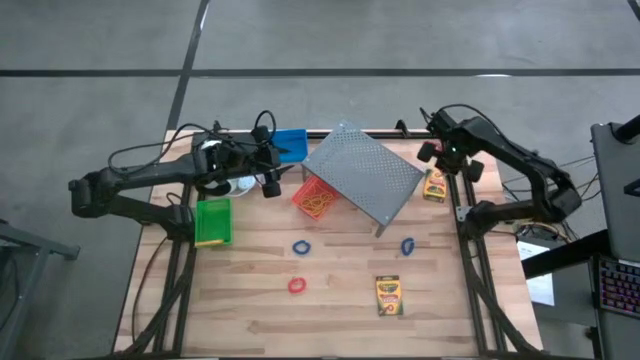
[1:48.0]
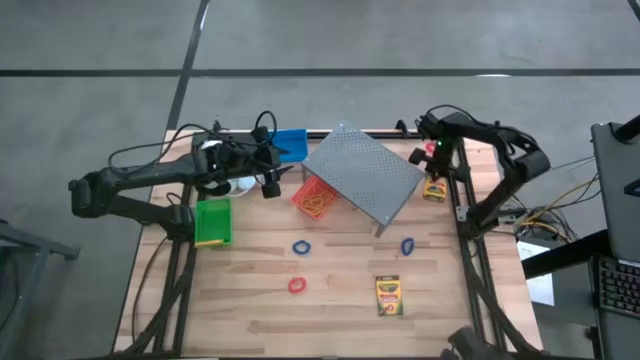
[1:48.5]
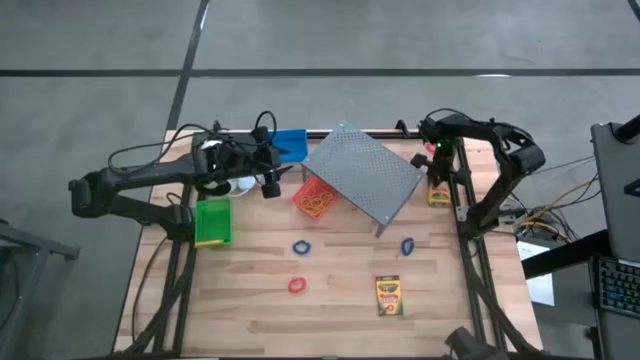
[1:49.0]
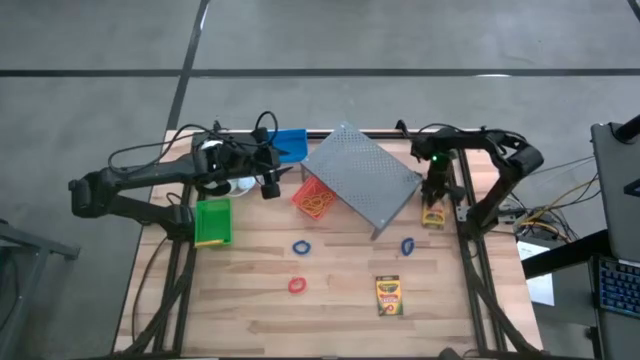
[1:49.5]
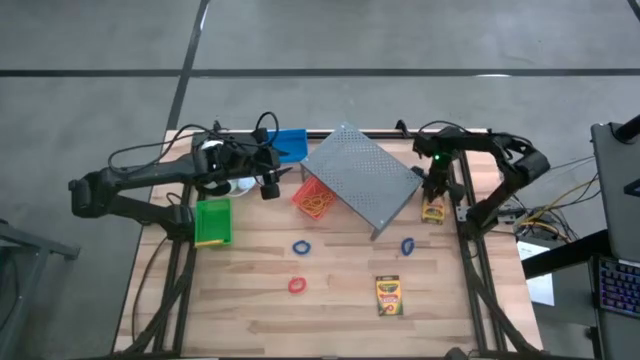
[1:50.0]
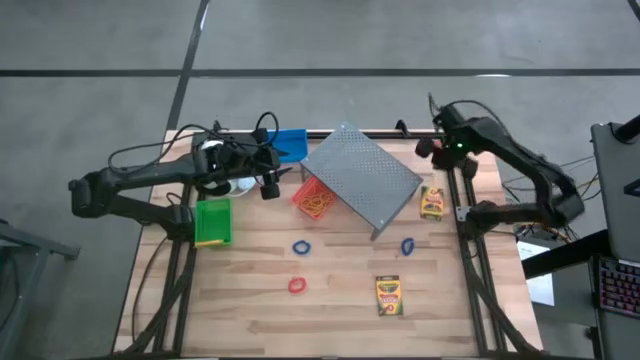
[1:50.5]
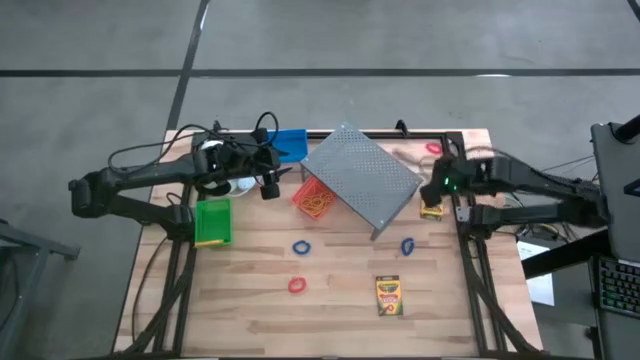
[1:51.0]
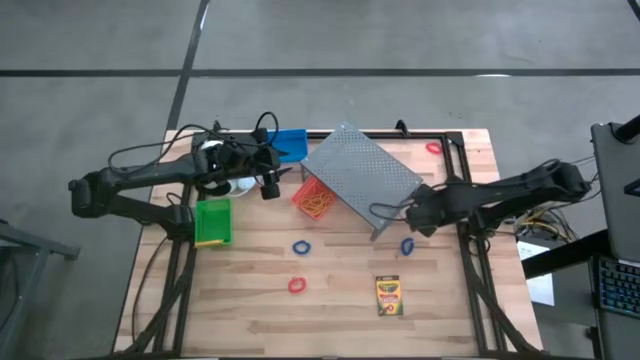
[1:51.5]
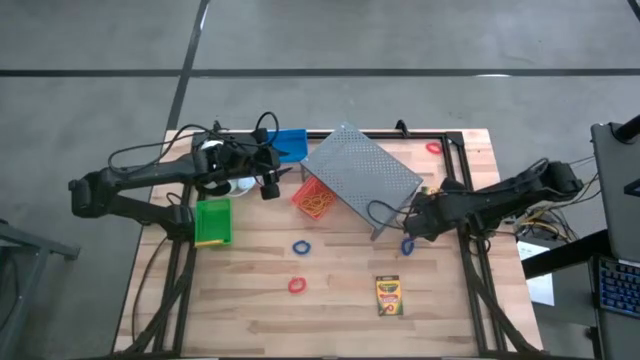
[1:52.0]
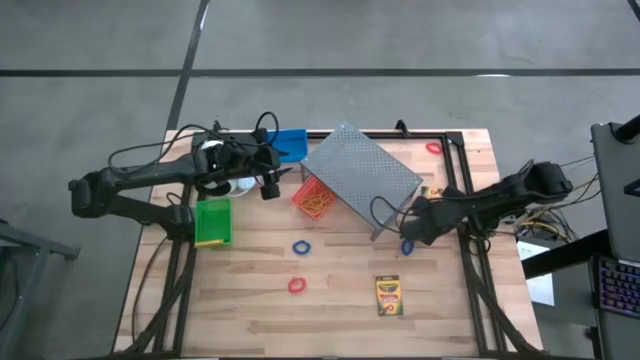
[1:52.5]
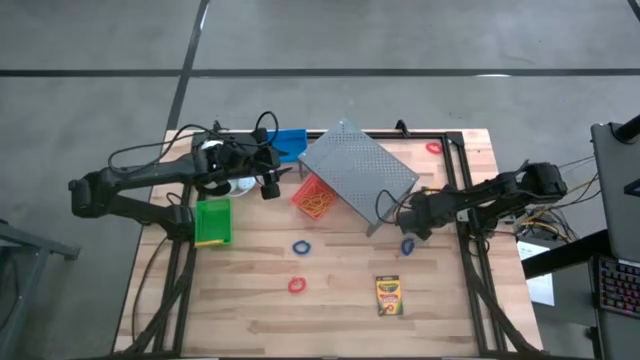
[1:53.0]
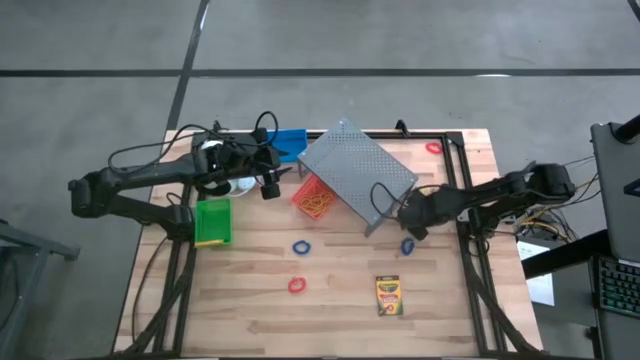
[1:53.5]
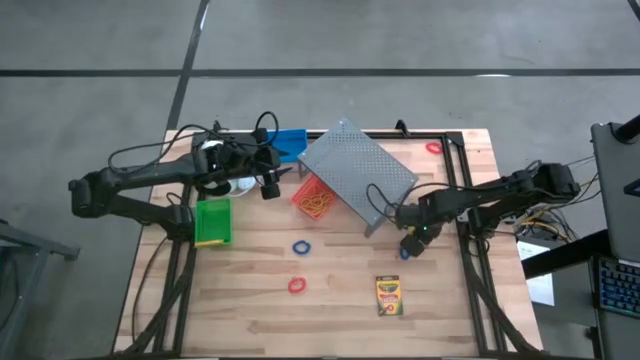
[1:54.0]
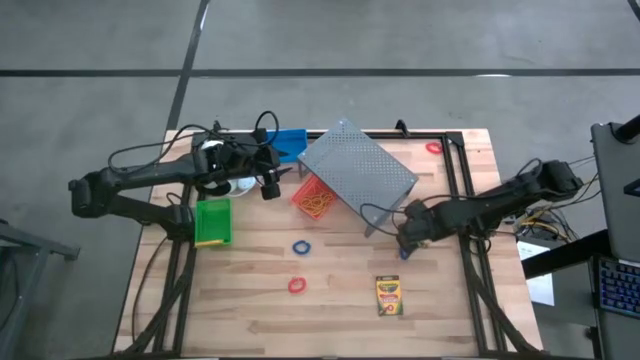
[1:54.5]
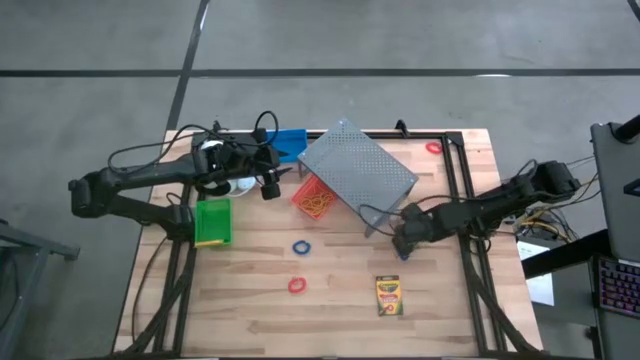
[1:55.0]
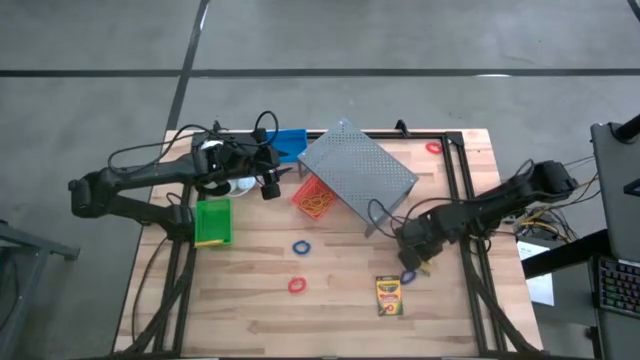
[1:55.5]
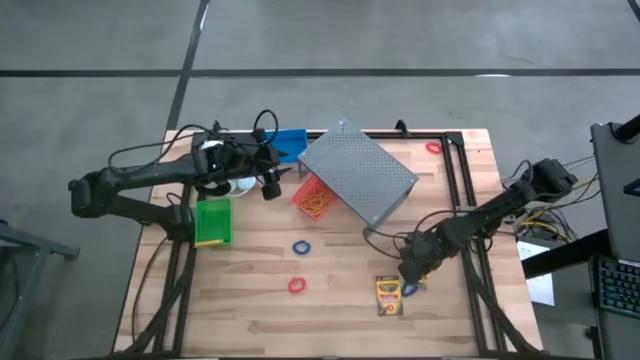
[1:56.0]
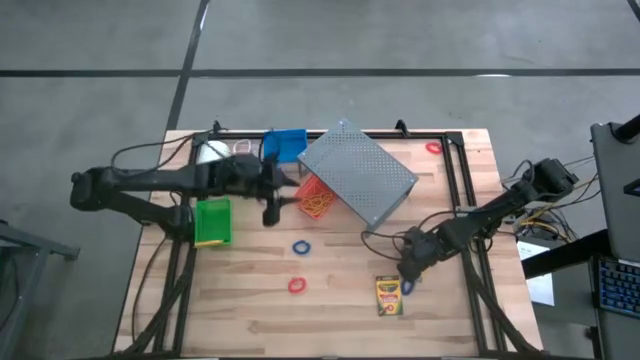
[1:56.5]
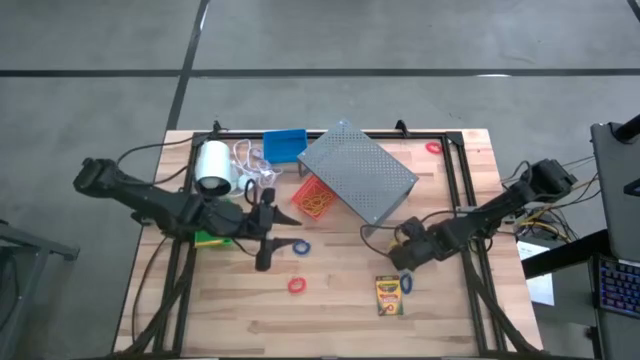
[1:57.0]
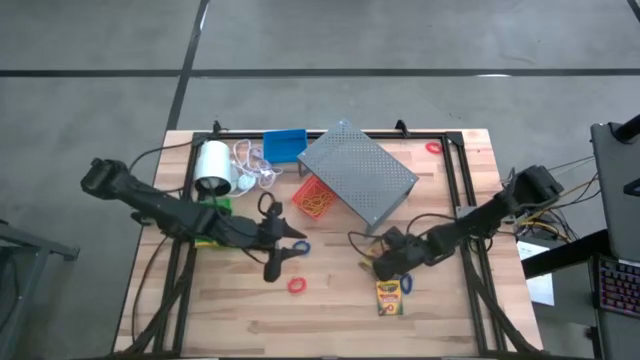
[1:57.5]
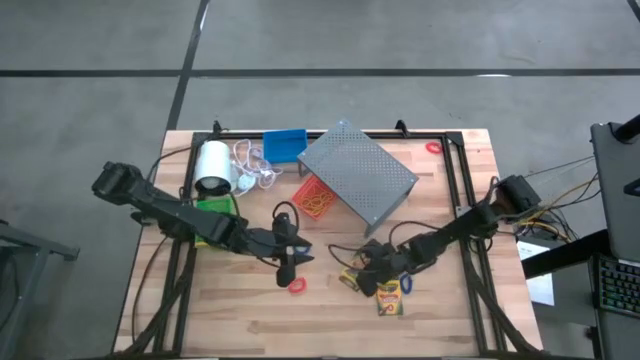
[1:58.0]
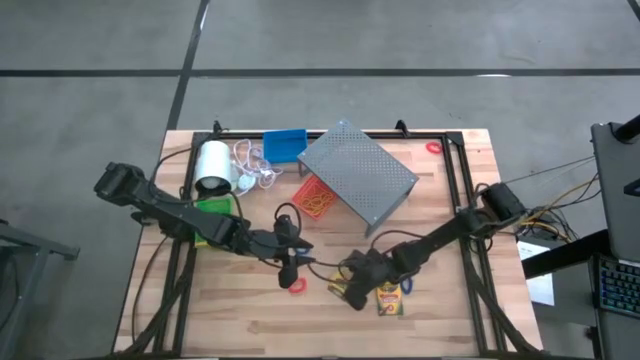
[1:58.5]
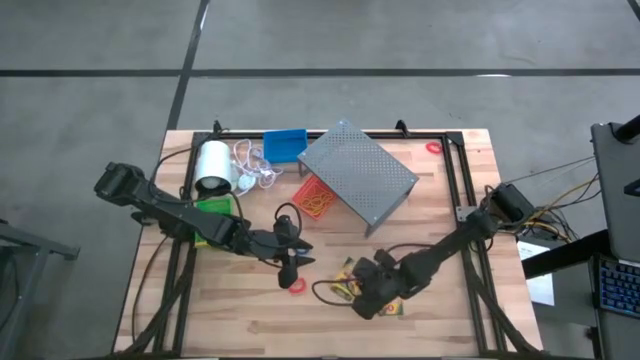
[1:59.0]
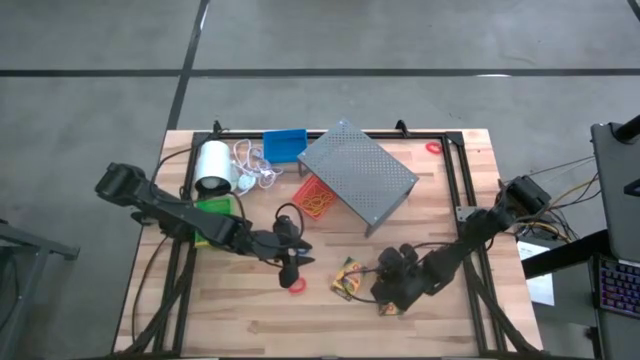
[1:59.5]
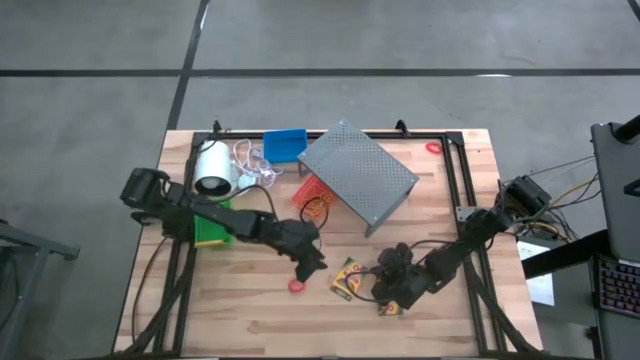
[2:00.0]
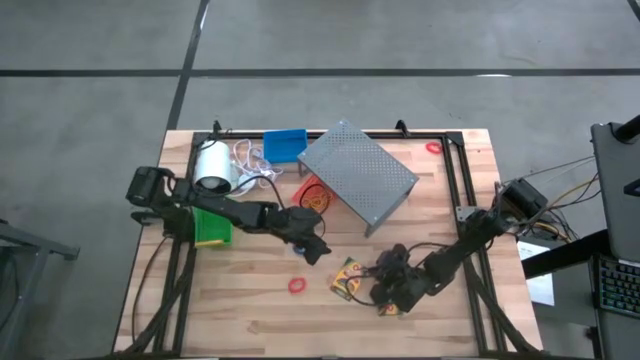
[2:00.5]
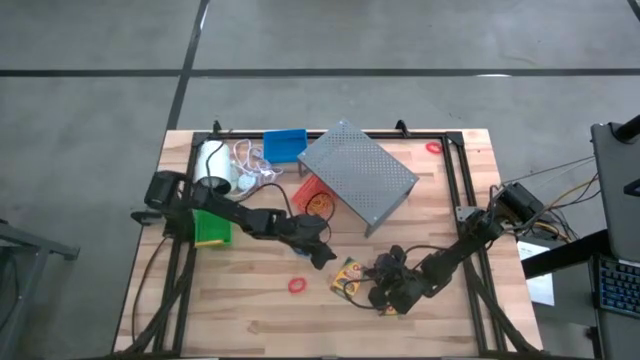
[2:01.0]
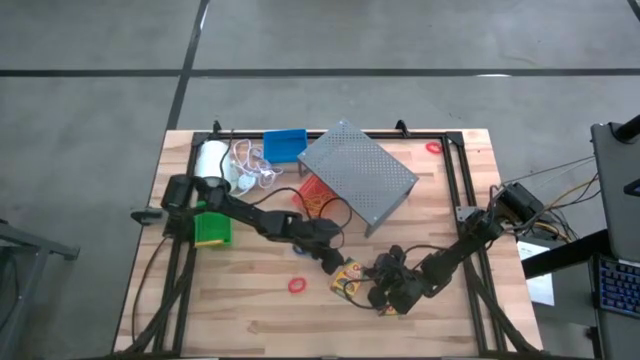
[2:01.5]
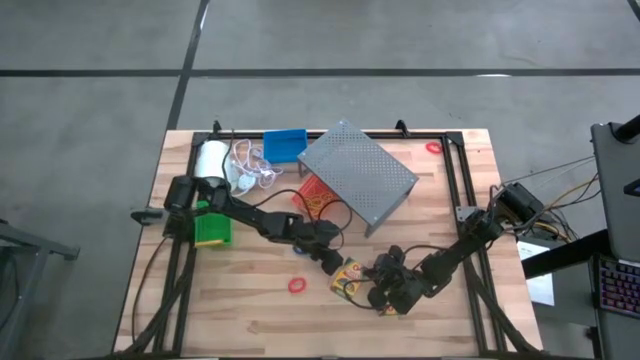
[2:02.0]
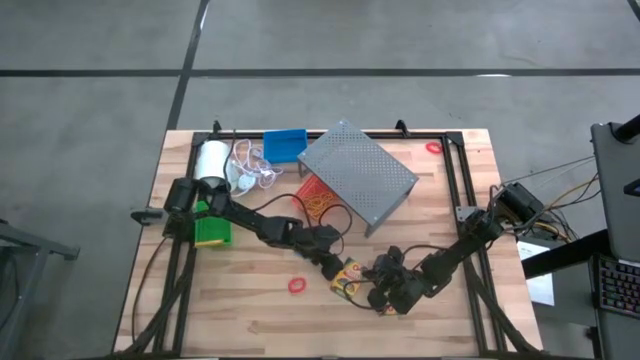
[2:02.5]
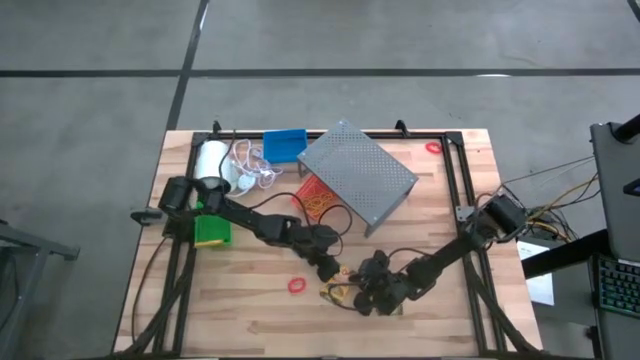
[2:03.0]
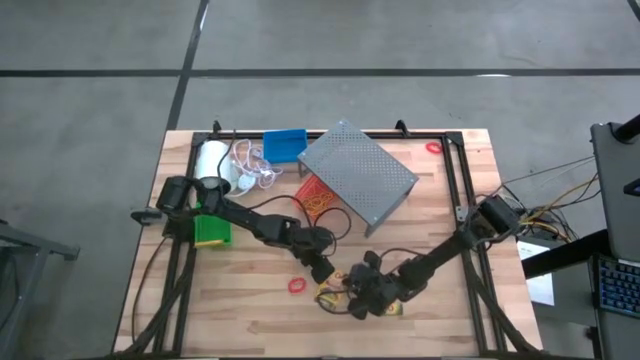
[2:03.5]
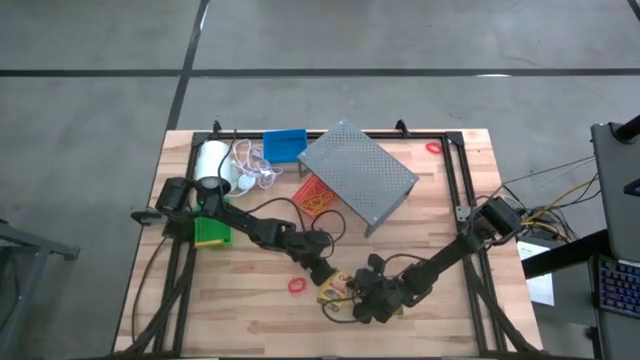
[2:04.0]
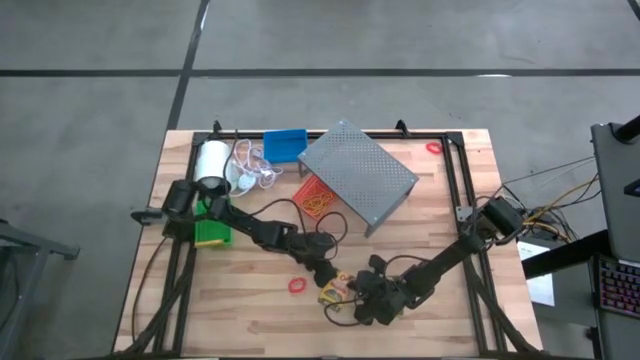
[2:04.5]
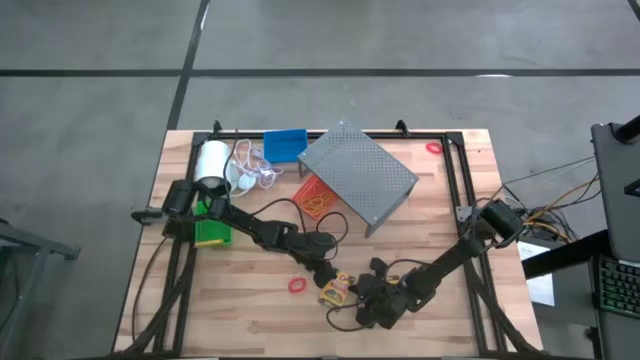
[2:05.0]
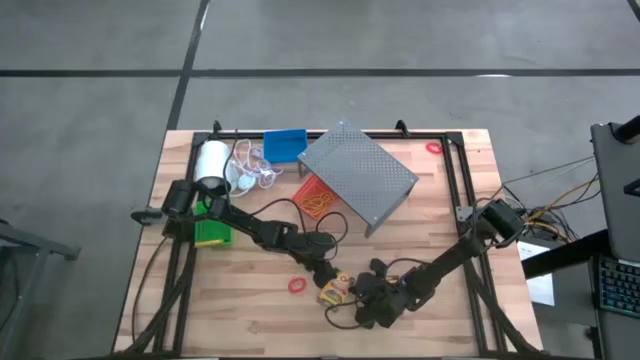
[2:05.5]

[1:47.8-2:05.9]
Task: Pick & Place Office Desk Supplies
Put the crayon box into the green bin

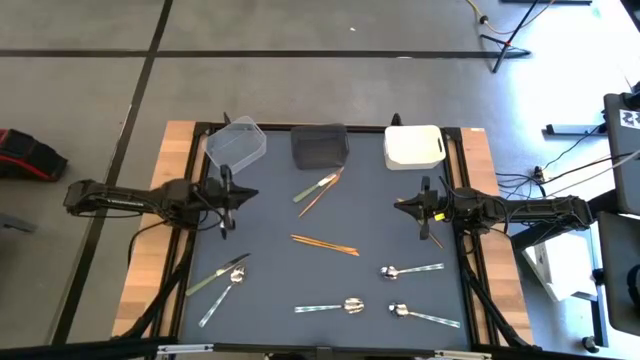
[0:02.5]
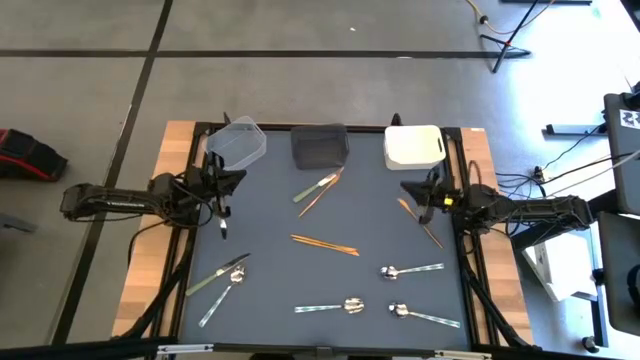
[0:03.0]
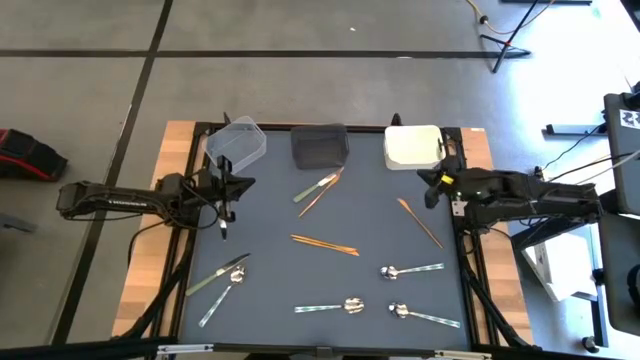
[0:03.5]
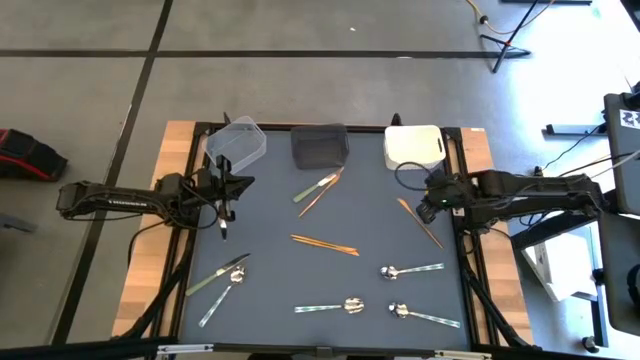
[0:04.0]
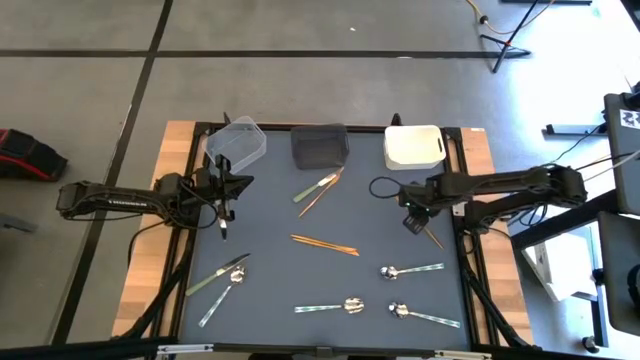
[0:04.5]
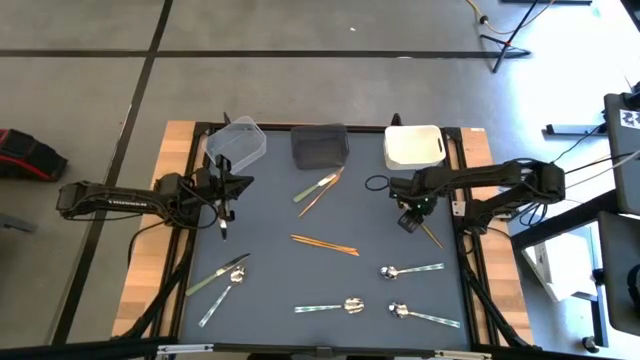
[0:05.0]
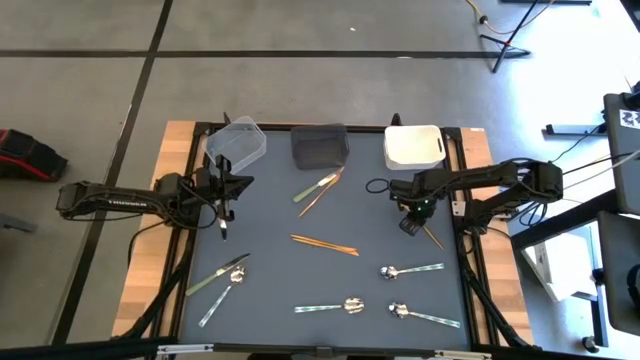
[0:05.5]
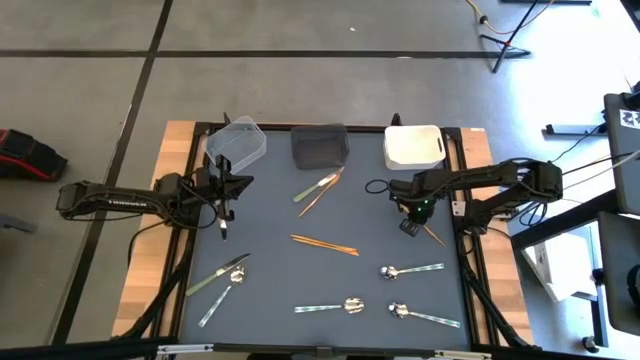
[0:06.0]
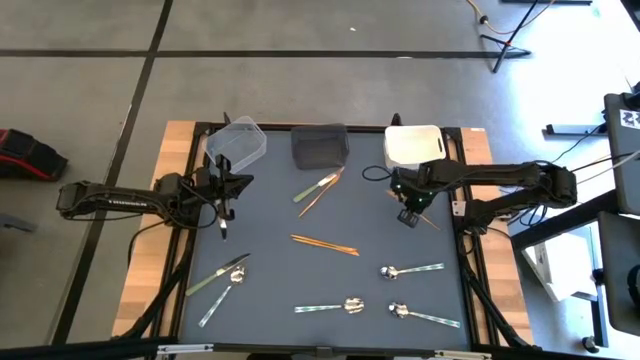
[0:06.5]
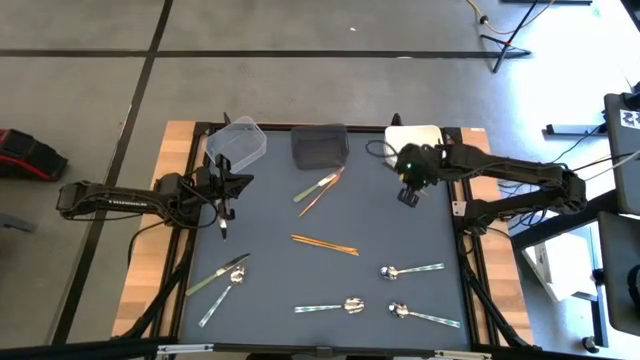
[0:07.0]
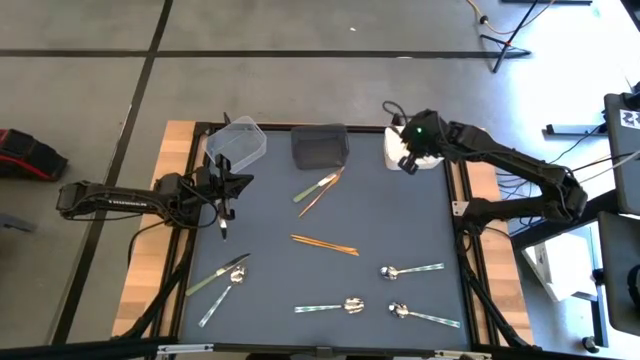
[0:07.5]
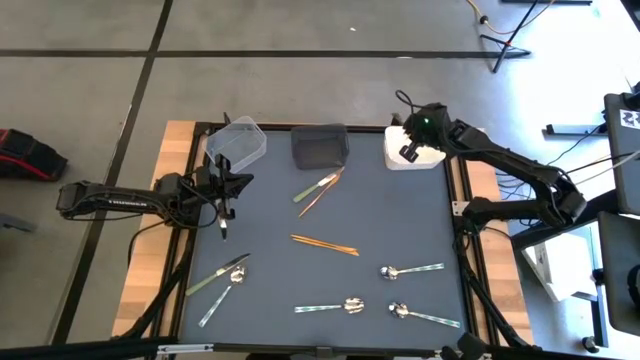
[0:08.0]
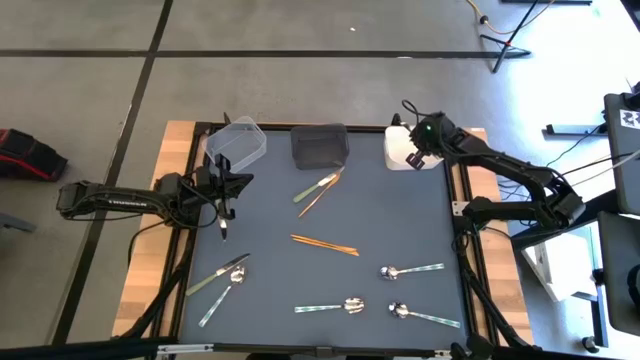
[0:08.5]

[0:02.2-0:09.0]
Task: Sort silverware by color (type)
Put the right gold table knife into the white bin
